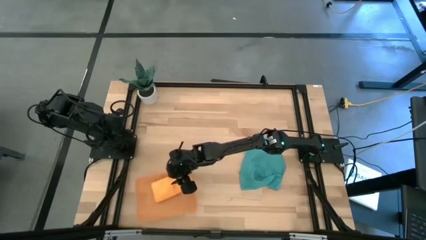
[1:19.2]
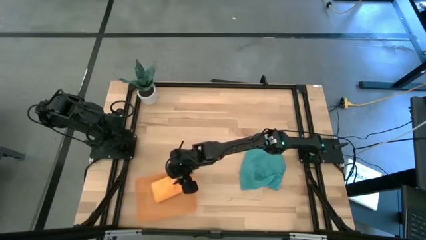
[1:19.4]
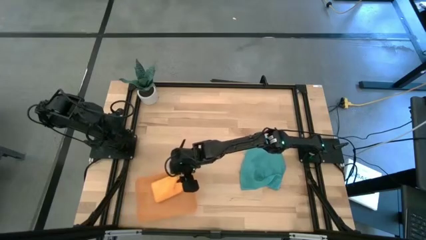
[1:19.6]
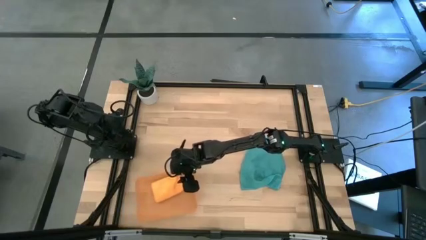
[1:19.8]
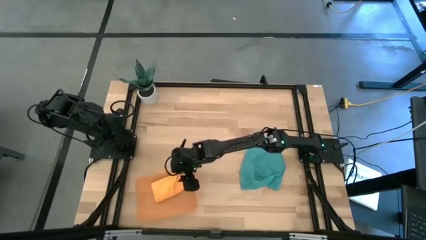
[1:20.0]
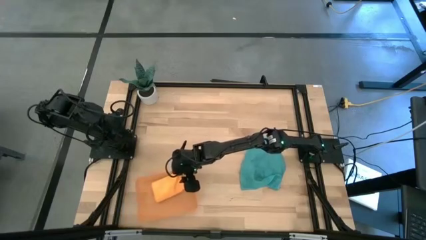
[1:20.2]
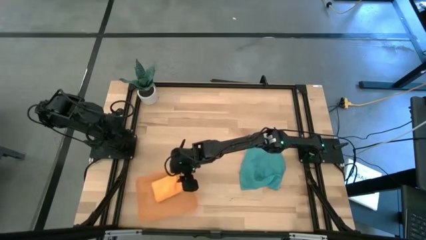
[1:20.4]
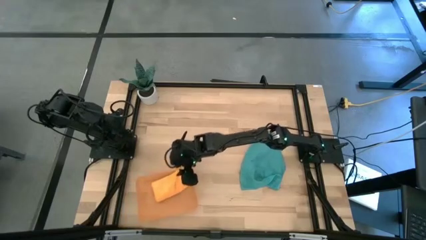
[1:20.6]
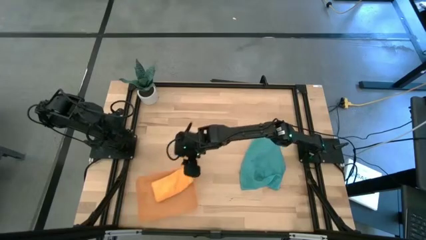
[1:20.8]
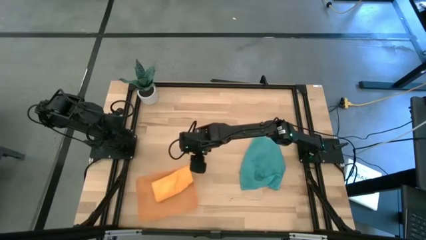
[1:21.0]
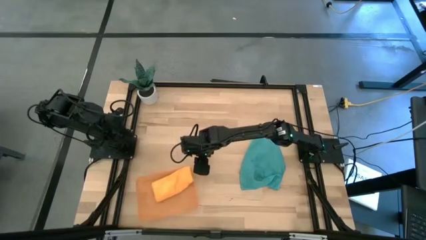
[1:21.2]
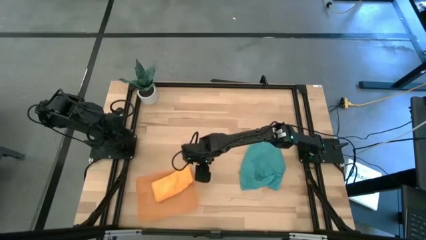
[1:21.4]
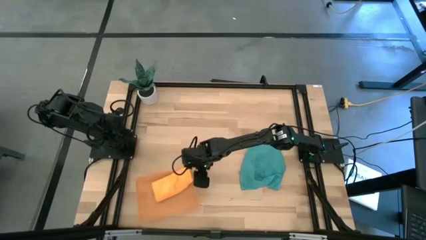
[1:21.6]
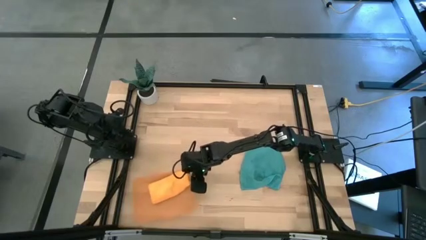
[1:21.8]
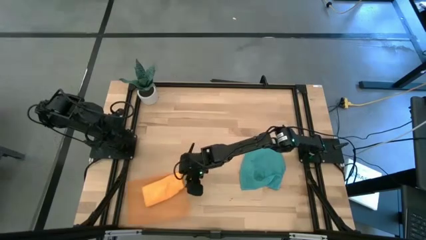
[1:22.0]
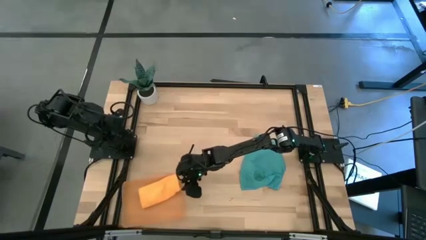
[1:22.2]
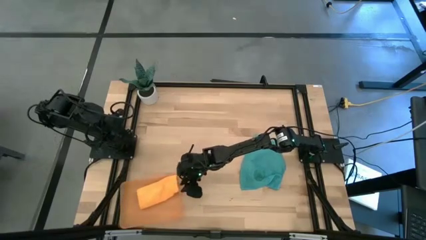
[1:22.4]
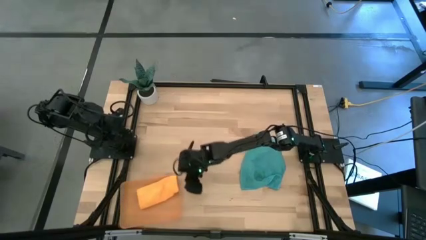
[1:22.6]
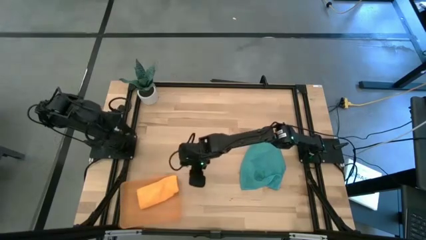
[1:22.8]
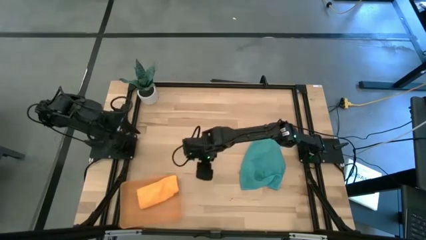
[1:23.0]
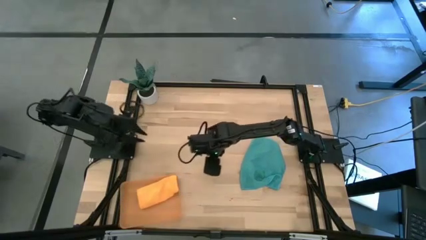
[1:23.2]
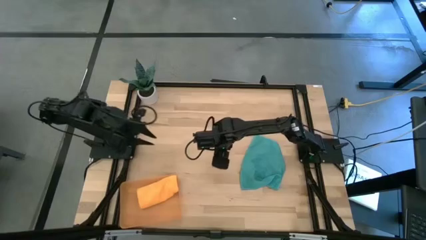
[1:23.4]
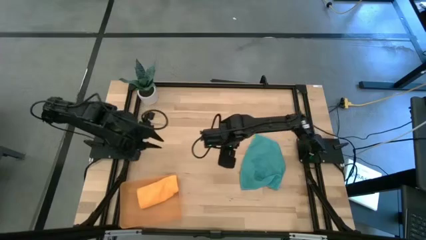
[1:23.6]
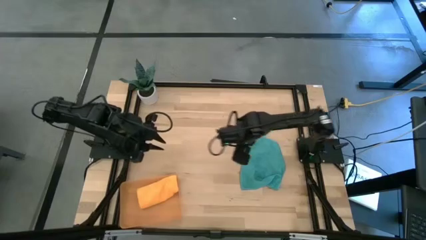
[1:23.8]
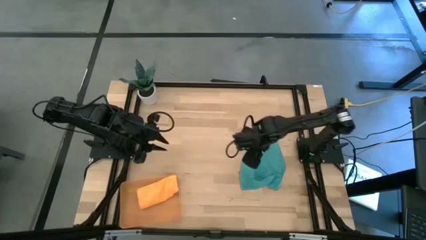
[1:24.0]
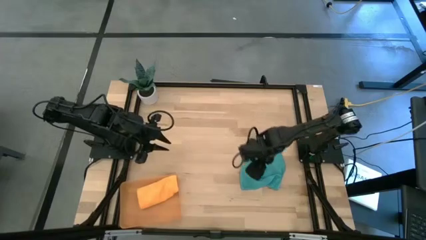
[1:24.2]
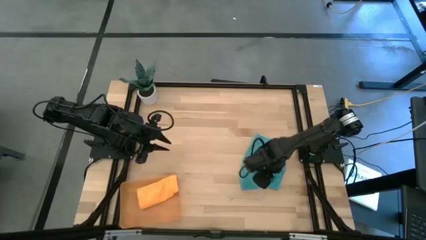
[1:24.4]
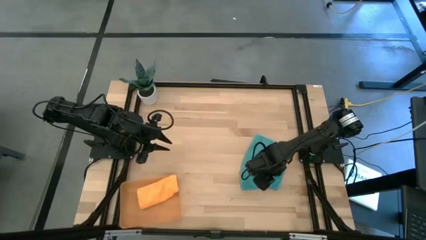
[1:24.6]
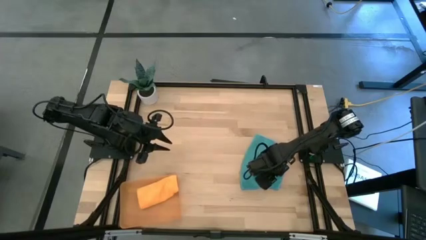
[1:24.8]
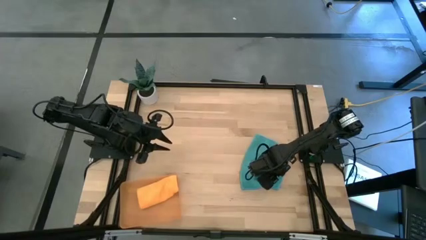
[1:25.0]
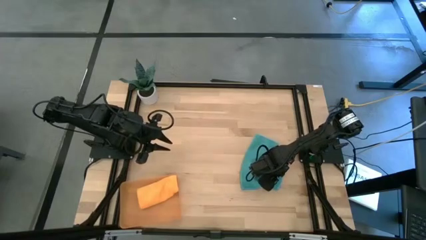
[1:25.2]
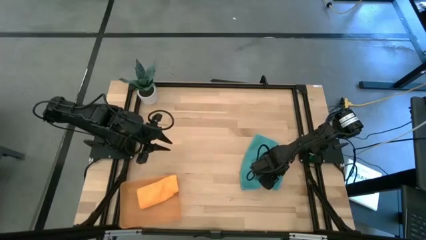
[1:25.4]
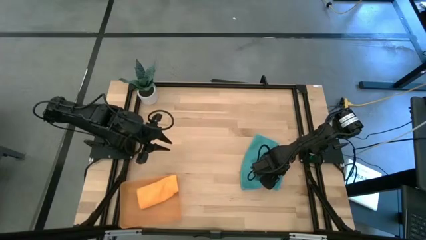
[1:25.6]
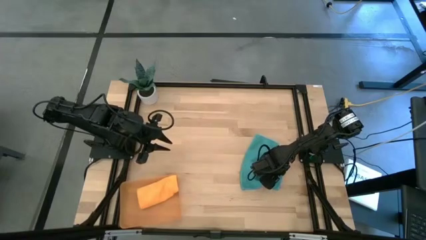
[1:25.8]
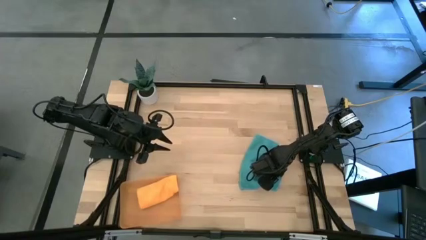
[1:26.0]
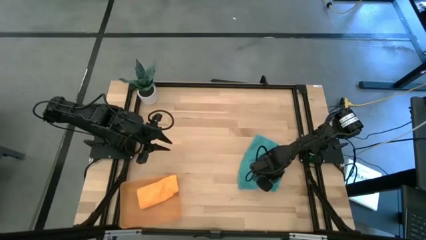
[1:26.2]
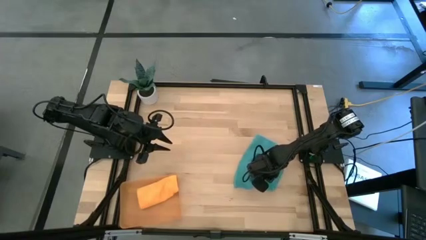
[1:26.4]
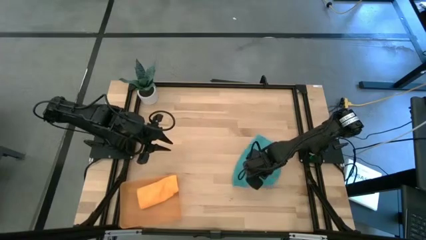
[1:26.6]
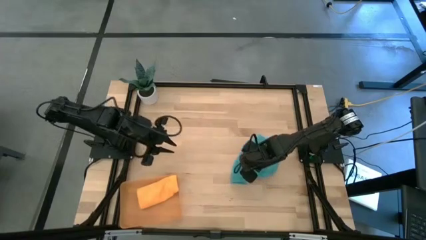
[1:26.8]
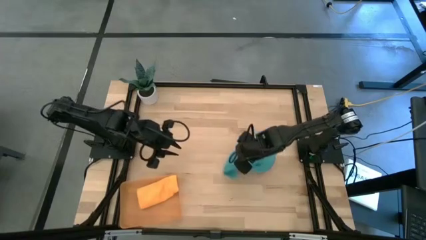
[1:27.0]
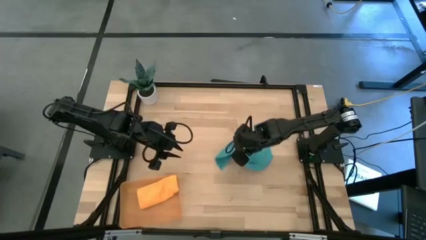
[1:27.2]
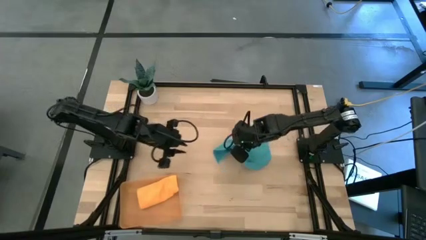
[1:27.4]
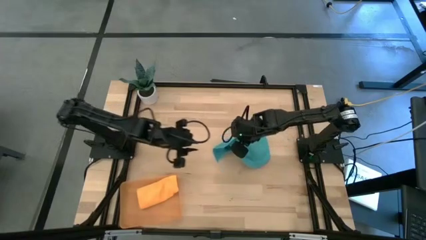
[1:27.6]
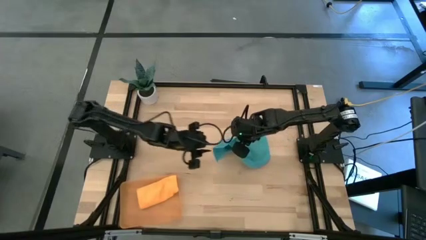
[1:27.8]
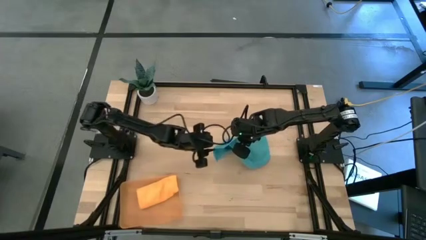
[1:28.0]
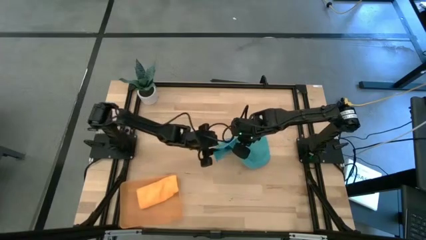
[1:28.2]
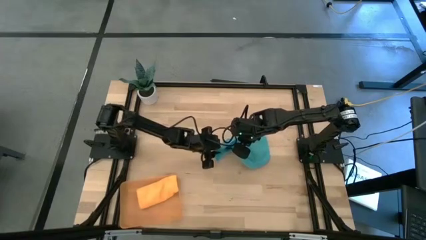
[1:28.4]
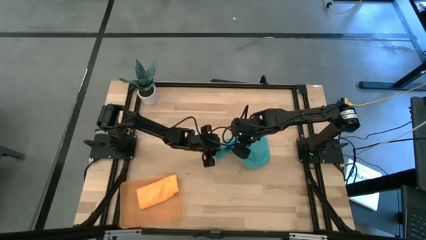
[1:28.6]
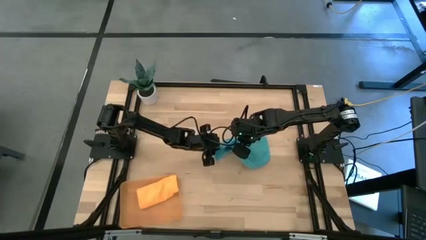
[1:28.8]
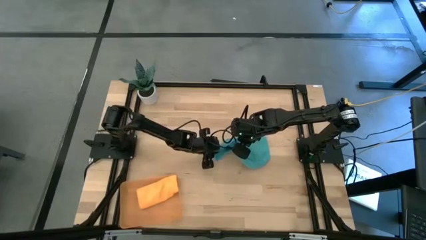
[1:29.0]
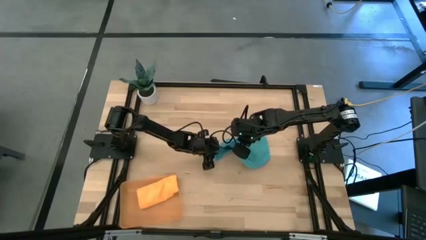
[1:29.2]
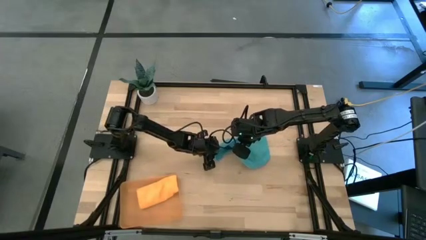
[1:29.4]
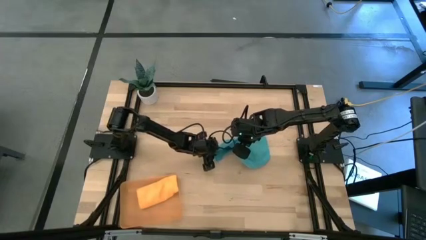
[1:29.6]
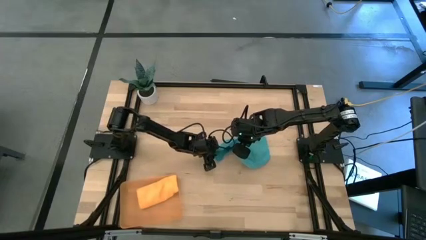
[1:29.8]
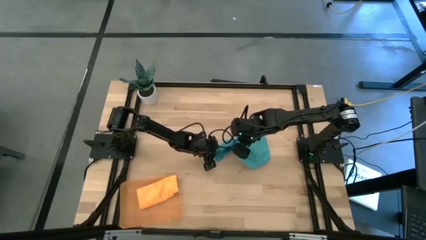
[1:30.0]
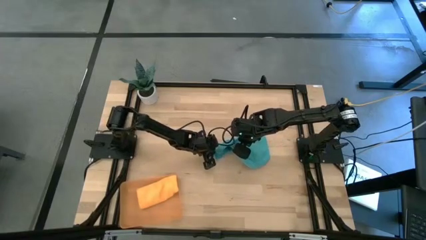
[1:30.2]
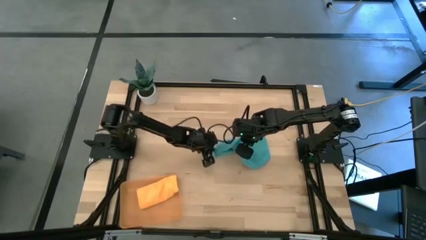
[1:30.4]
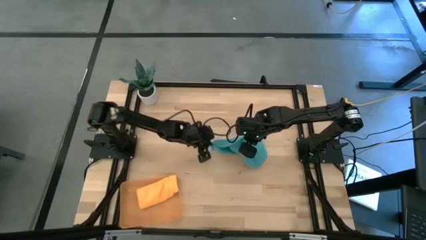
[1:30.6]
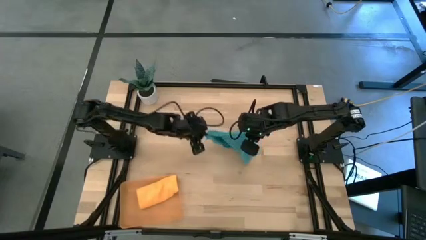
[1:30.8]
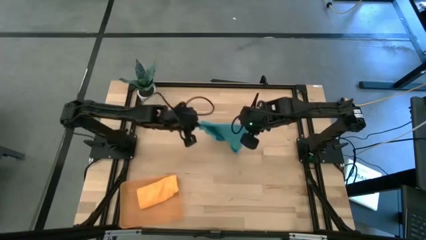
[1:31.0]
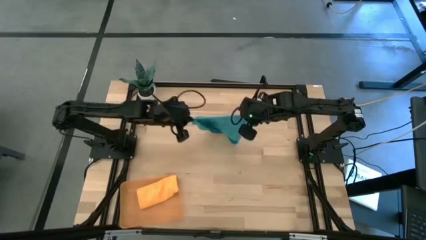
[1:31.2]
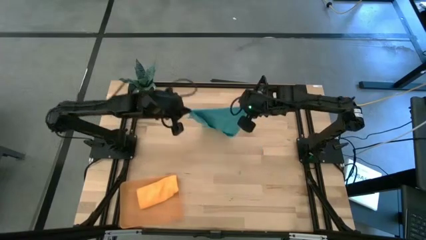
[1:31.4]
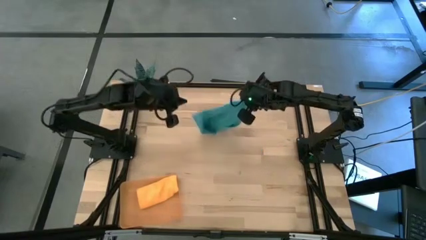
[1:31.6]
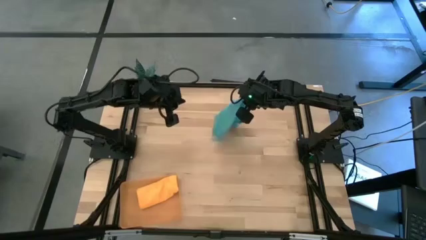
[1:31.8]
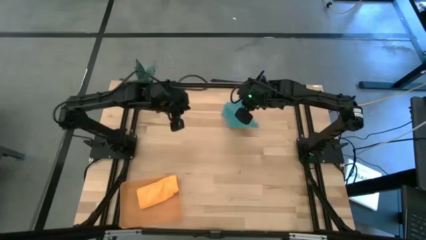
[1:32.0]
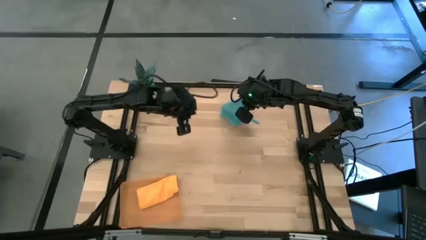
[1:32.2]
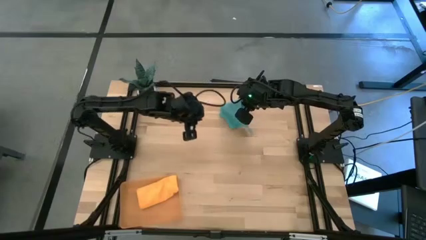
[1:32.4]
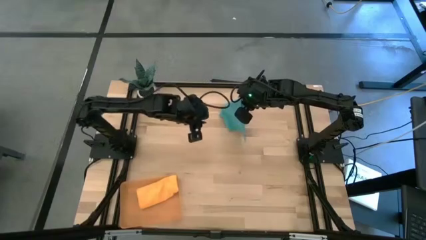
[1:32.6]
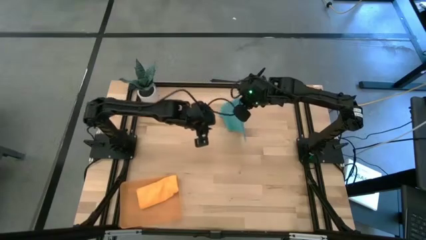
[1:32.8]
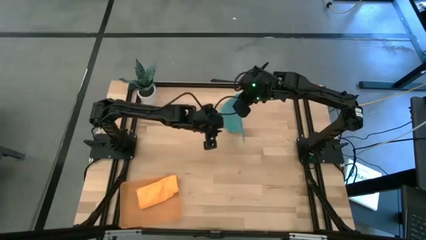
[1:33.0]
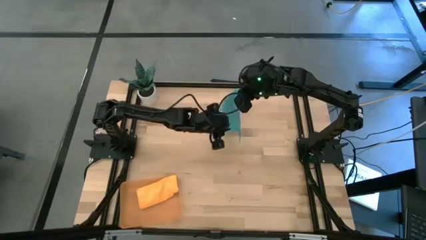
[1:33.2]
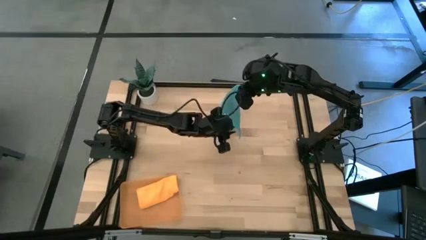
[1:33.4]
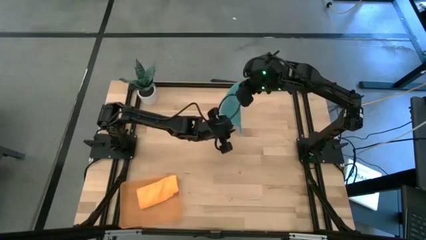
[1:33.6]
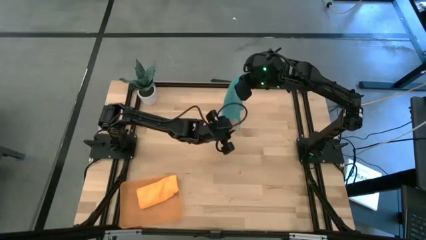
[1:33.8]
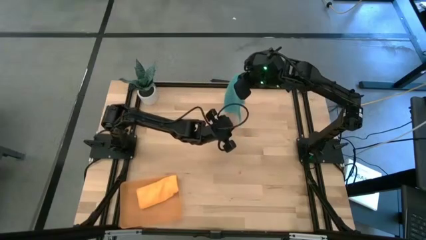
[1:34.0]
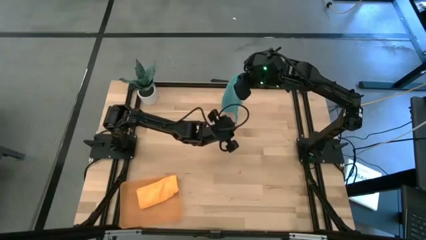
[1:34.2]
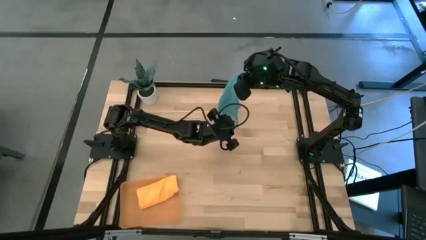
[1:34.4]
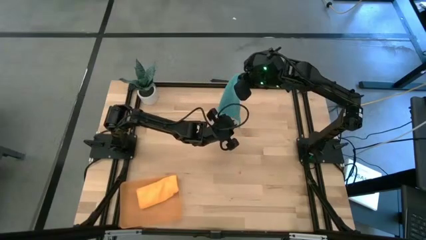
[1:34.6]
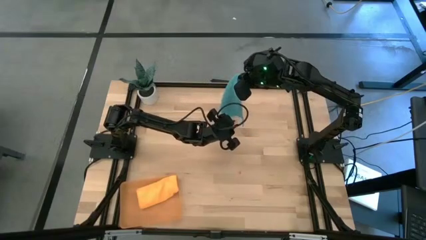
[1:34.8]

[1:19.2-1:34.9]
Task: Roll microfiber towels into tight, uniform cylinder then place into a basket
Roll the blue microfiber towel

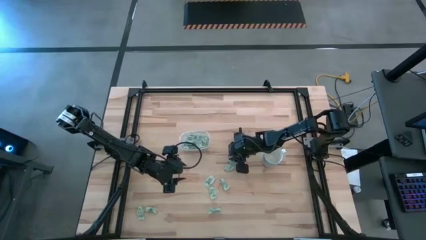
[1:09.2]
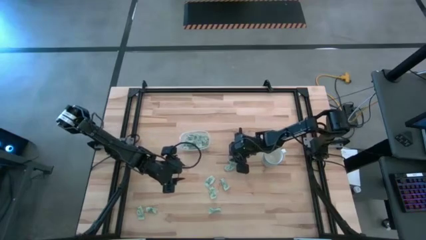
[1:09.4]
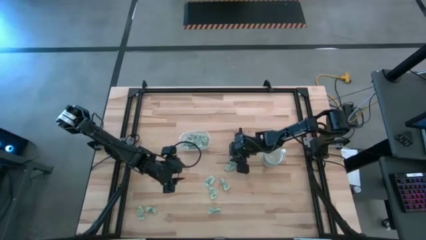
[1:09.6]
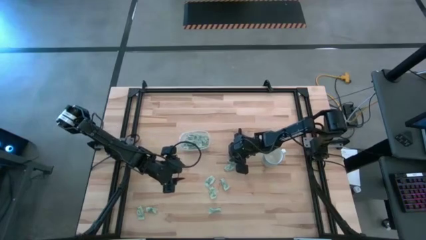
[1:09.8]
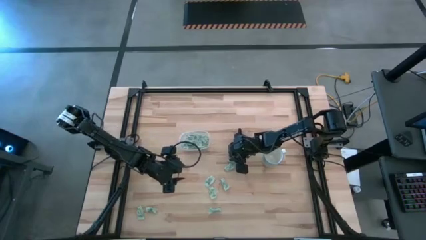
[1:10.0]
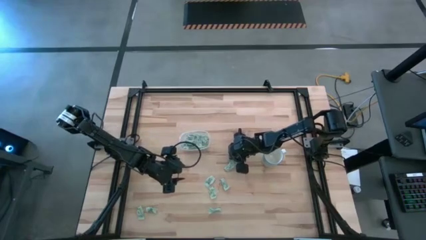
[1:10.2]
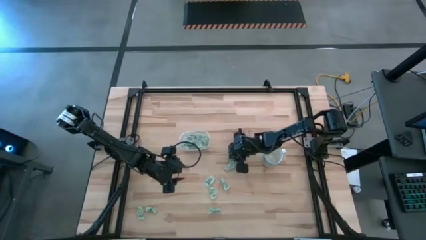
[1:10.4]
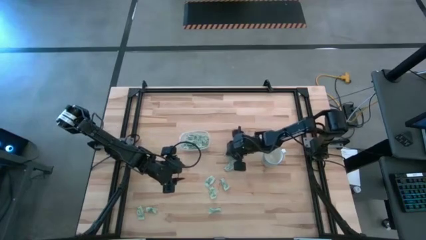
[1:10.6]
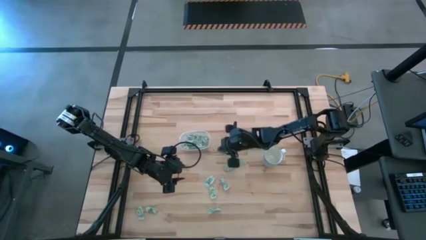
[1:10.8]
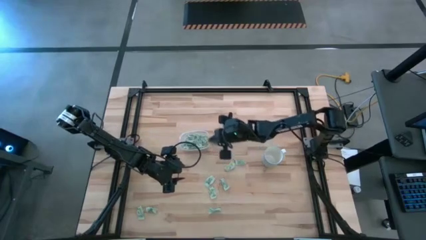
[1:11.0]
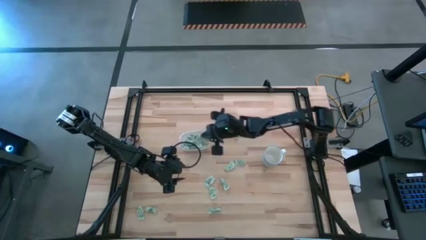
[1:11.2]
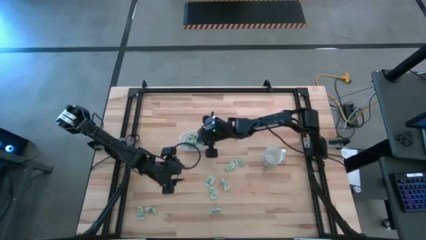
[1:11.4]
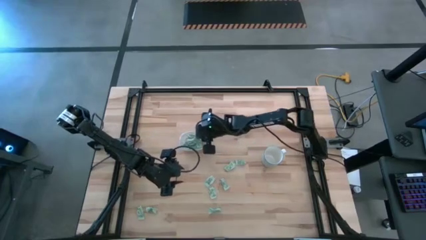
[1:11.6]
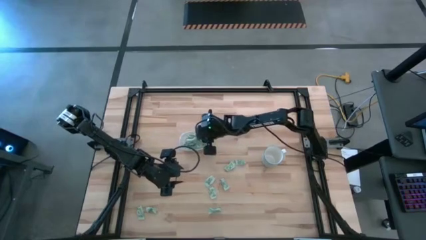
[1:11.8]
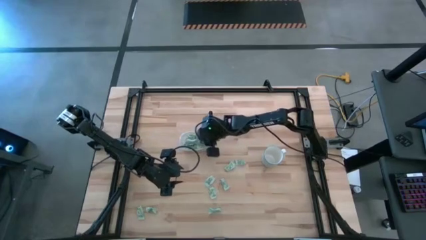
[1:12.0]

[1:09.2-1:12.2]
Task: Pick and place Stevia / Truvia into bins
Put the stevia packet into the transparent bin
